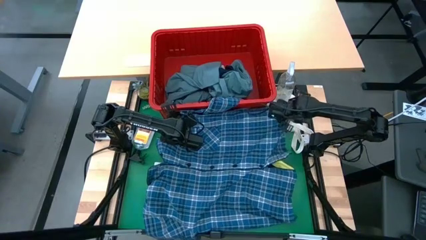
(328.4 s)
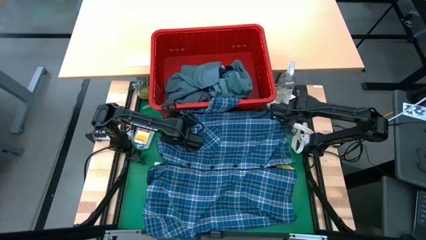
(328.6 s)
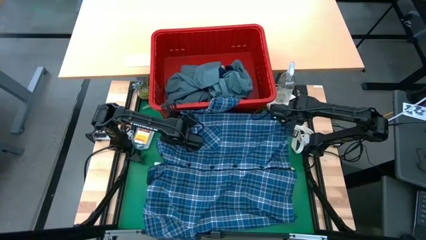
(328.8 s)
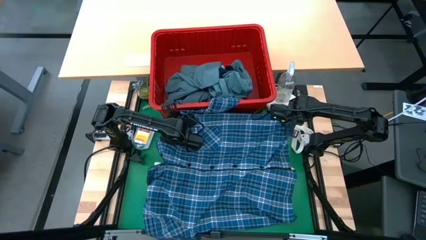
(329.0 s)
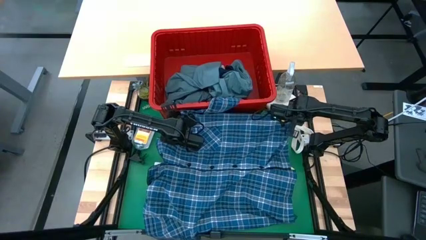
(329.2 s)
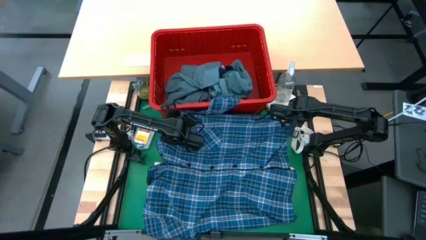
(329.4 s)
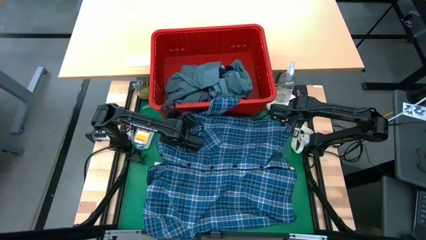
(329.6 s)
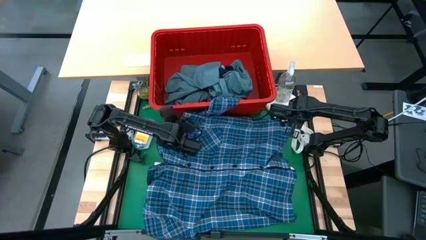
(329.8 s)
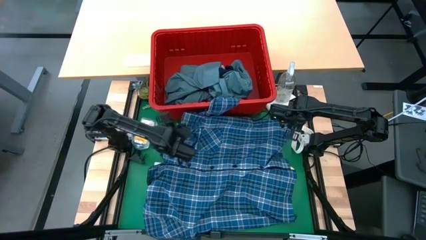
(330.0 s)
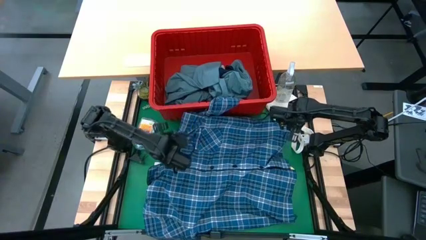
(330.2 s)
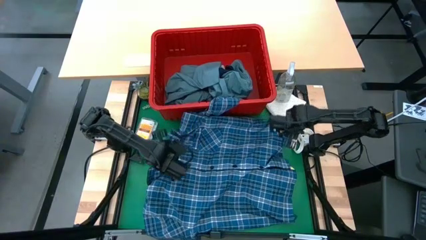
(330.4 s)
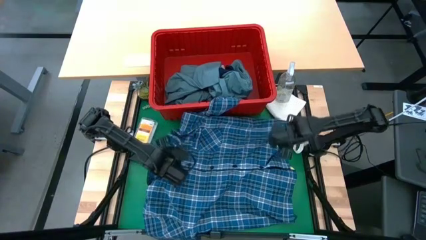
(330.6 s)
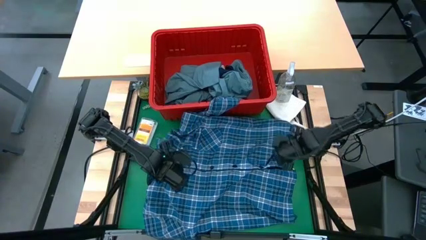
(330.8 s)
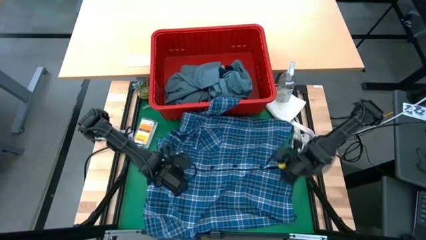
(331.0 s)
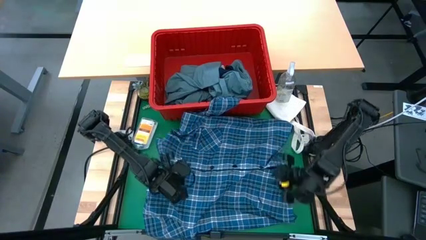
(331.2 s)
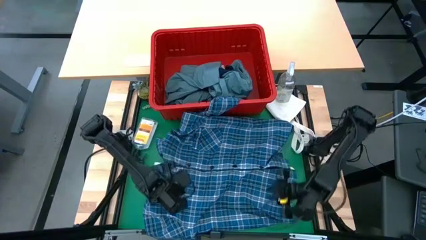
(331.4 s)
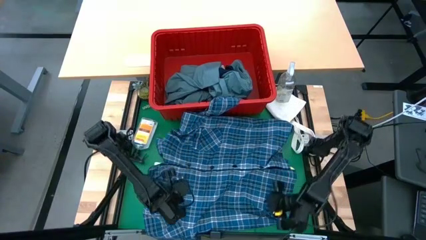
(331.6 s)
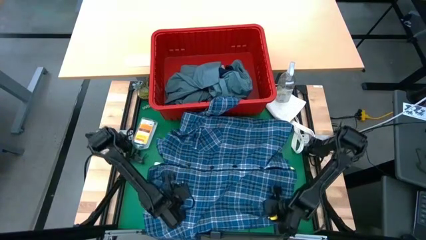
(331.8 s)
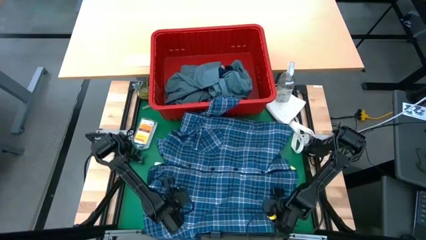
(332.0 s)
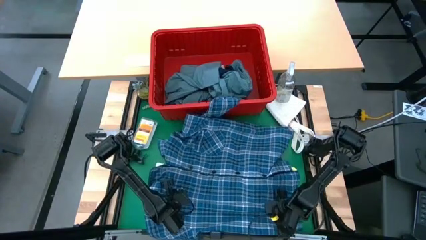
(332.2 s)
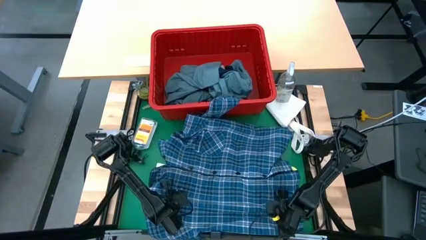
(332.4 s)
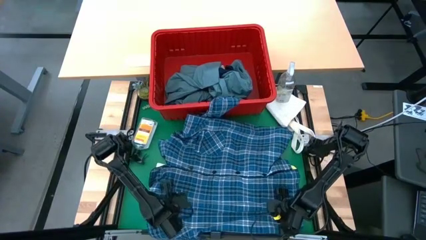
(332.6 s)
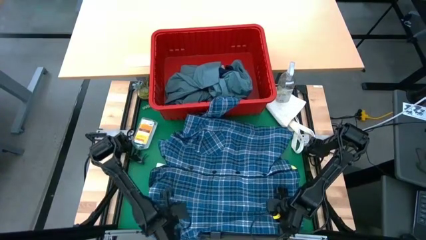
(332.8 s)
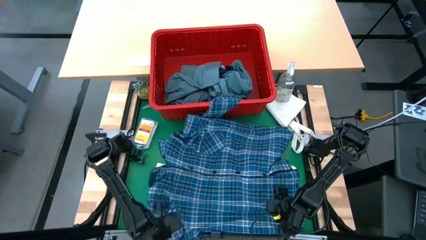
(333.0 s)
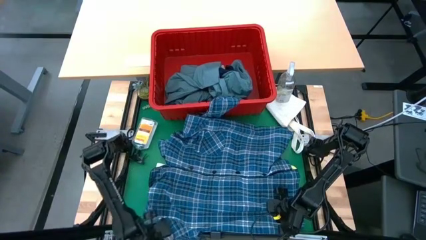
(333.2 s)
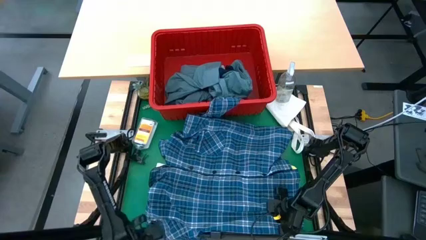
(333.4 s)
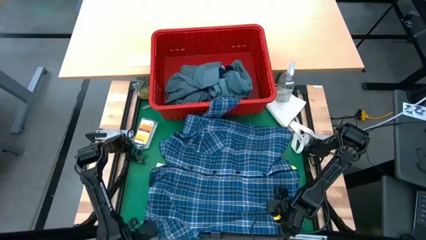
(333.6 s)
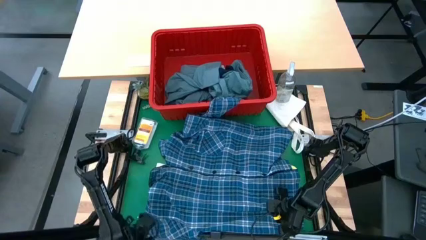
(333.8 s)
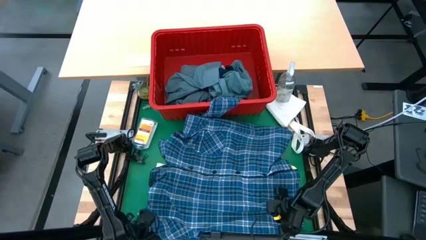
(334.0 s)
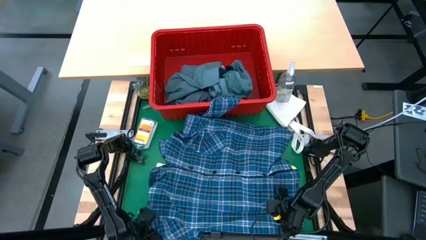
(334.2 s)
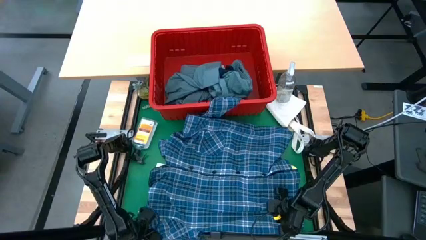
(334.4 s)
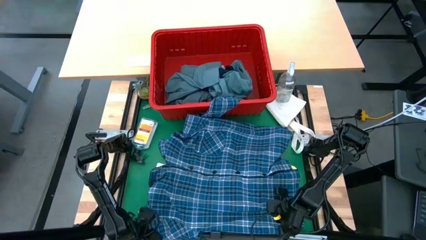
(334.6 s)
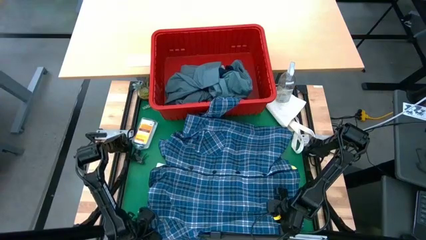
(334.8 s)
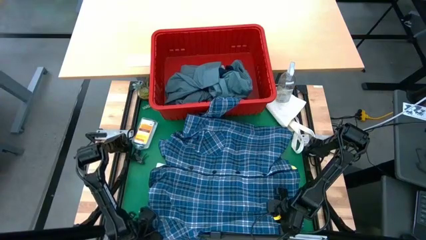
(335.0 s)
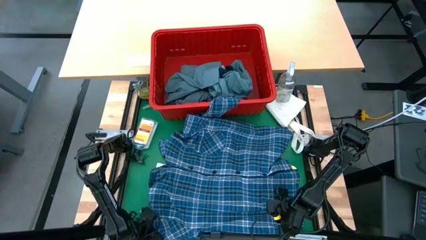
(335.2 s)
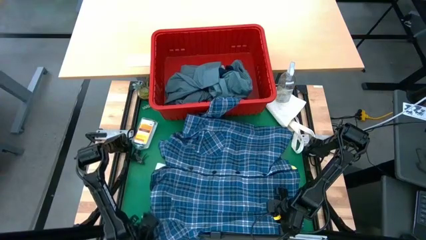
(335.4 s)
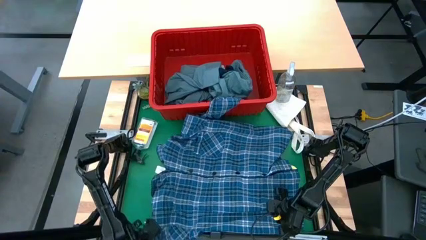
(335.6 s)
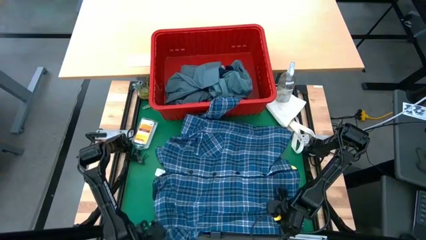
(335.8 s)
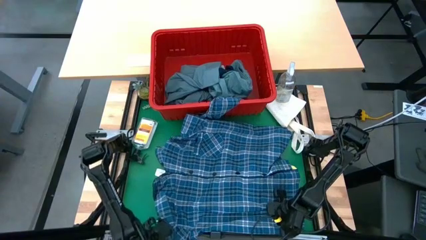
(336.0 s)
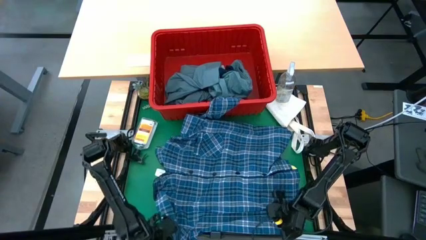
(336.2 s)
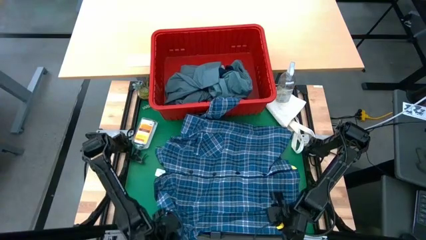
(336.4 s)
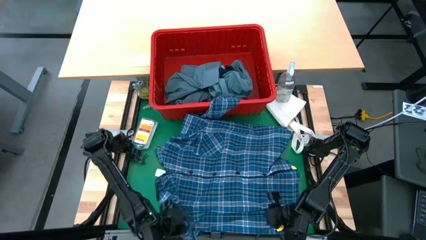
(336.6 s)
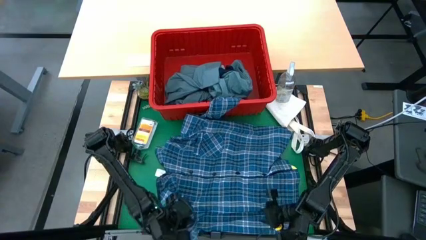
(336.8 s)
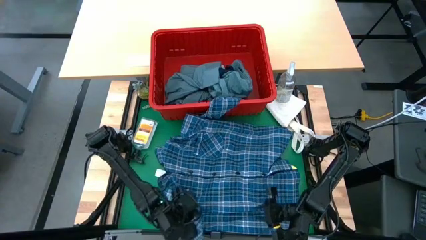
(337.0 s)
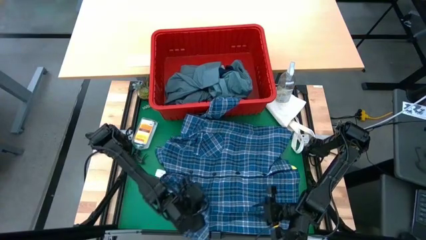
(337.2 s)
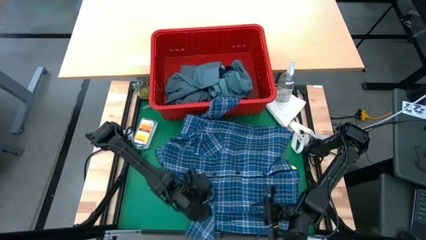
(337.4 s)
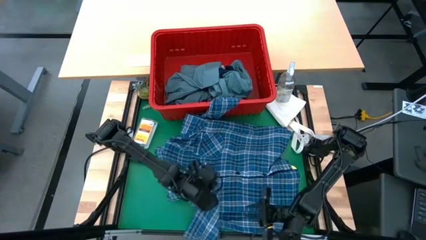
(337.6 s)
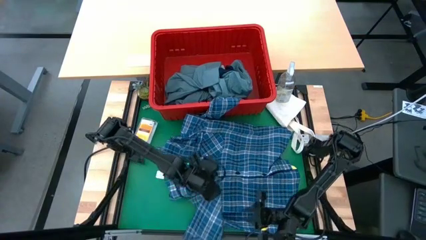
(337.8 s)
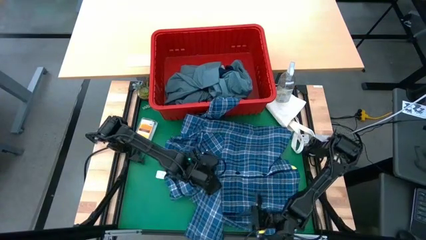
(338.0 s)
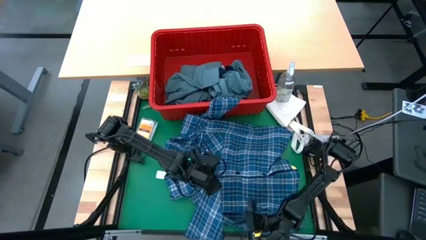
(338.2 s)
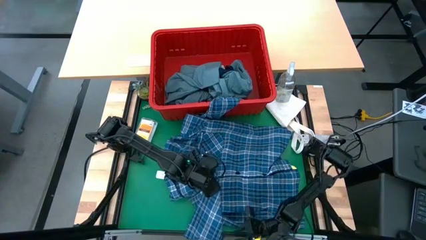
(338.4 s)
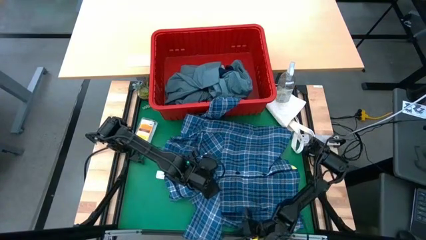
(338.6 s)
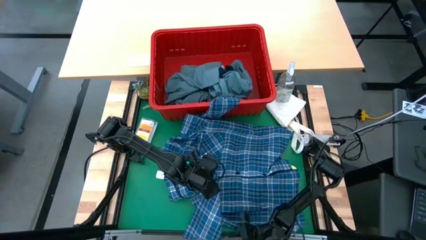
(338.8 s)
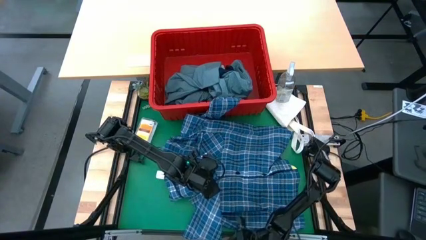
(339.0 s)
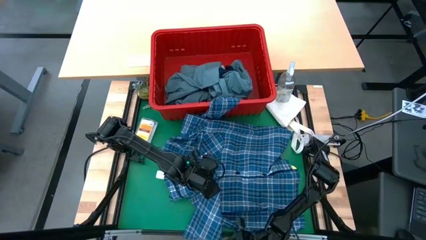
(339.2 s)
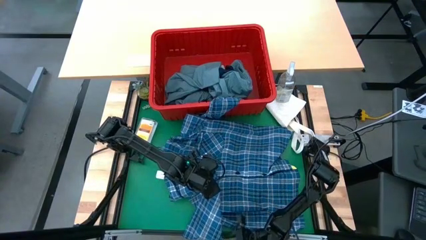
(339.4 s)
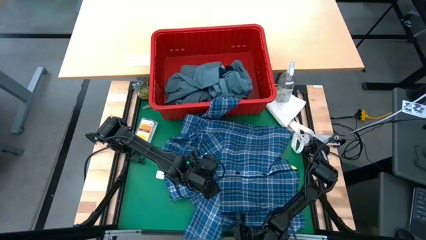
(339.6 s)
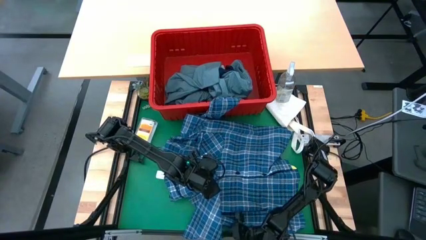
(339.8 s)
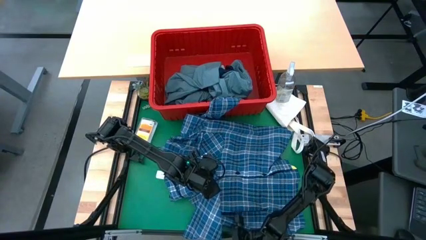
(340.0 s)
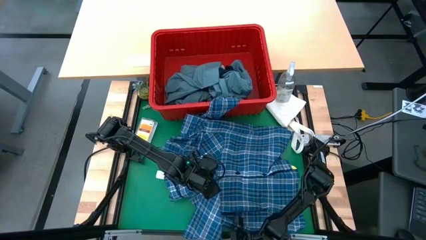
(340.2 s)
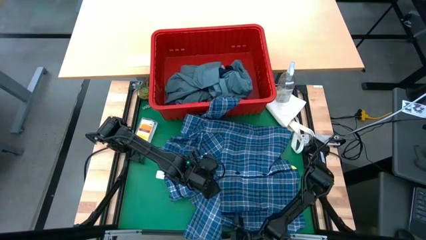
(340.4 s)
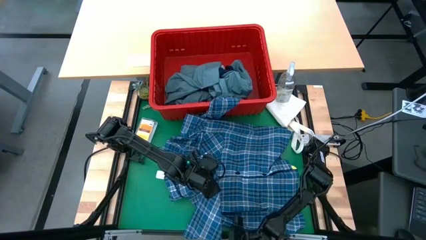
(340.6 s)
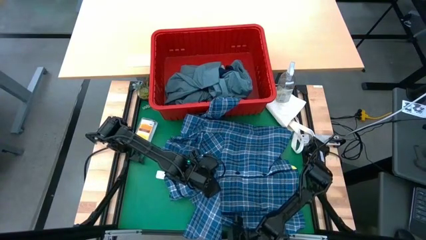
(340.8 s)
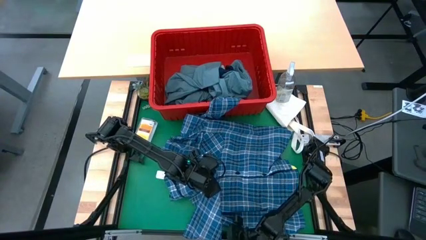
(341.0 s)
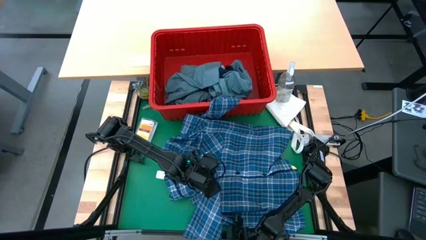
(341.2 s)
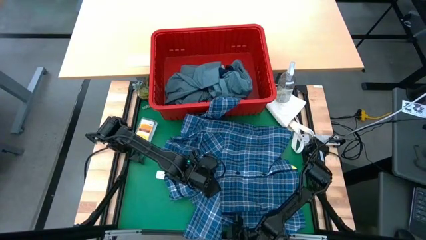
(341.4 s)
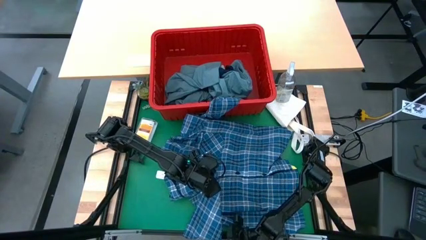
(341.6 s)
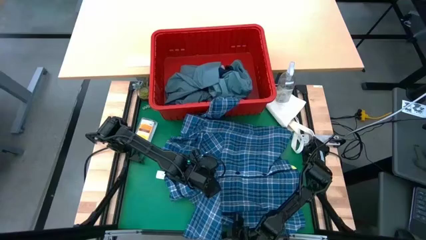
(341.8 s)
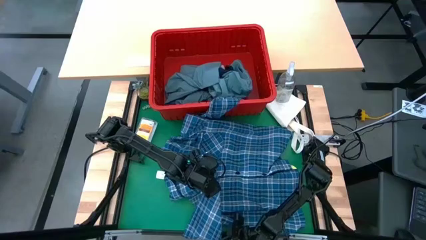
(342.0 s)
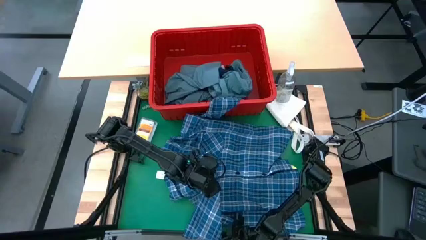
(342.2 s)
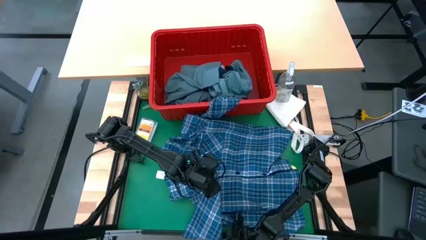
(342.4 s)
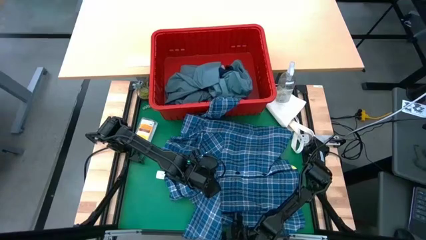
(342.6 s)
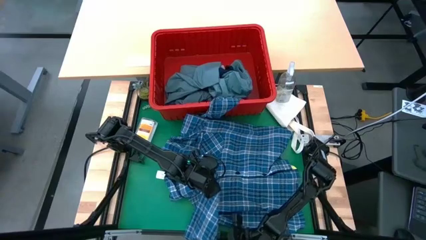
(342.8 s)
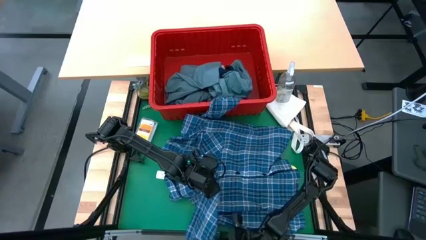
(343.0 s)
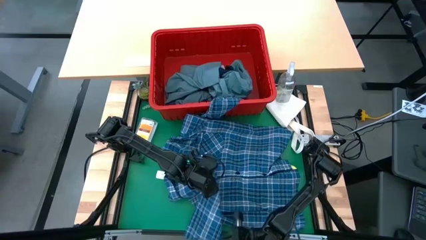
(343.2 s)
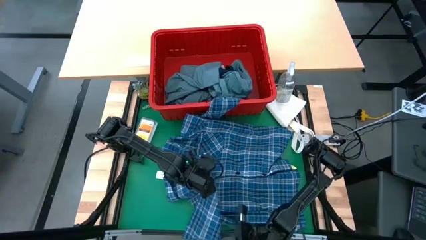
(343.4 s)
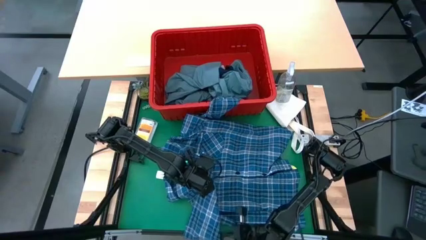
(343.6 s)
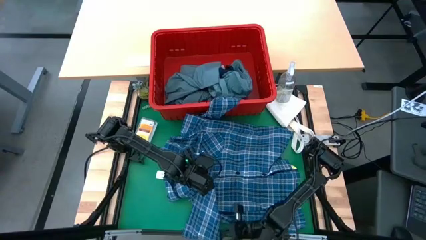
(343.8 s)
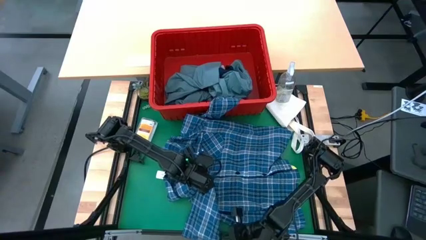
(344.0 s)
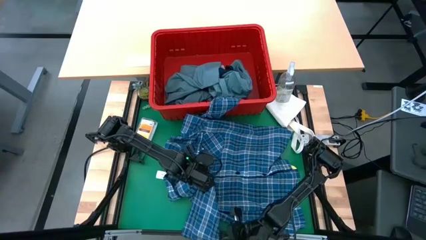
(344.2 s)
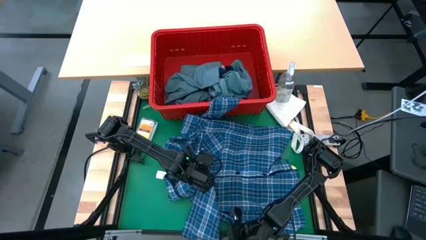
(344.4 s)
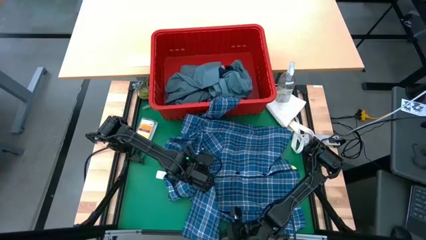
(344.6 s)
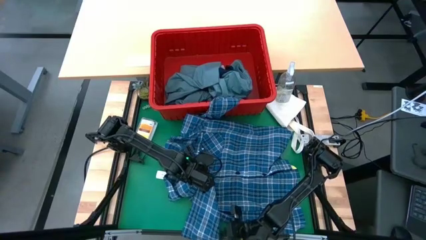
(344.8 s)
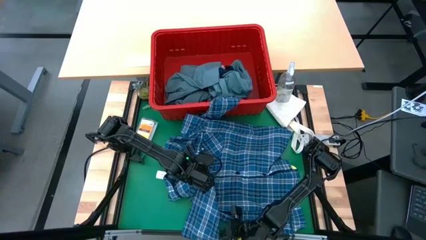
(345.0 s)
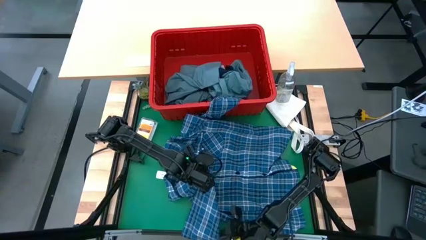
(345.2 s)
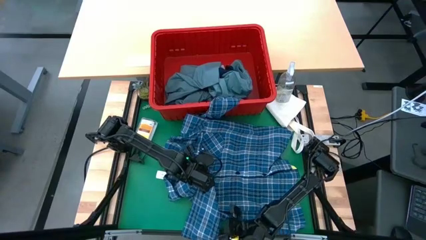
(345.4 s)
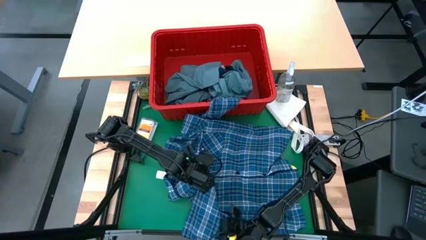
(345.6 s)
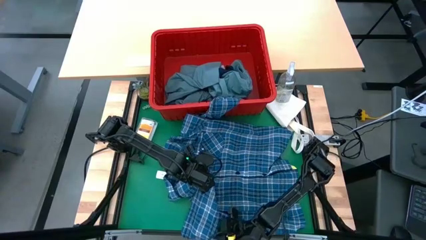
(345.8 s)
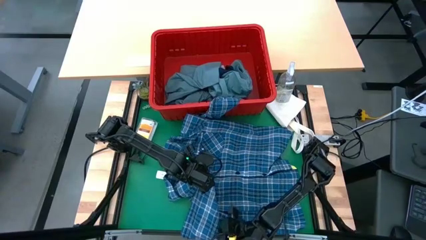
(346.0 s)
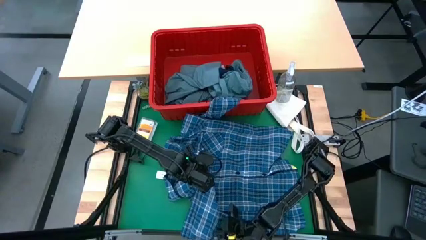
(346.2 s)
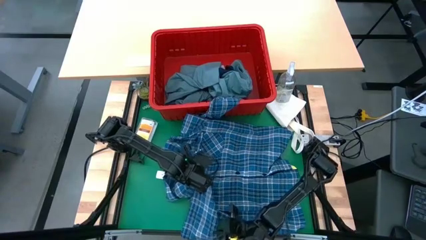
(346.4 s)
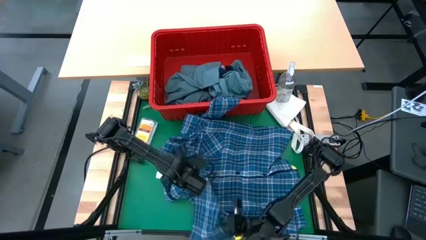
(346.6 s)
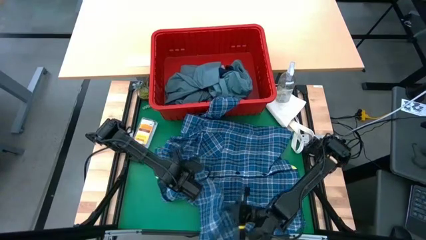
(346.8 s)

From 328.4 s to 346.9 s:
Task: Fold Laundry from Bin
Fold the blue shirt
